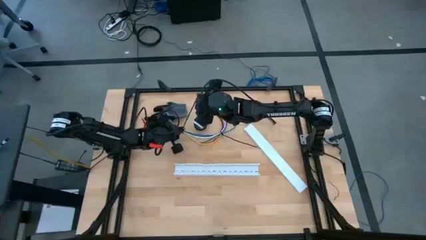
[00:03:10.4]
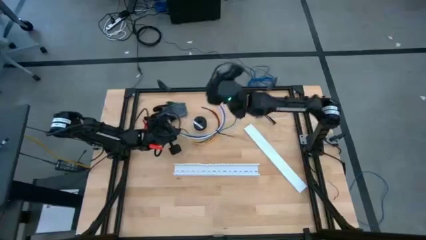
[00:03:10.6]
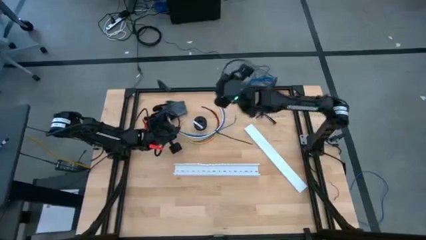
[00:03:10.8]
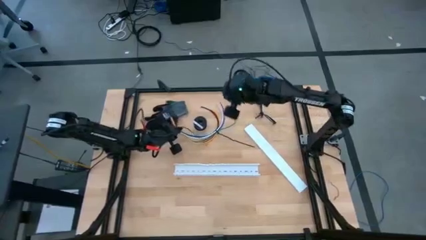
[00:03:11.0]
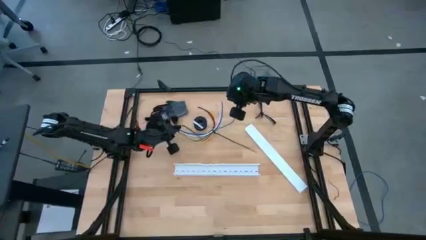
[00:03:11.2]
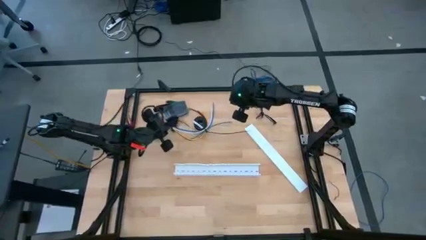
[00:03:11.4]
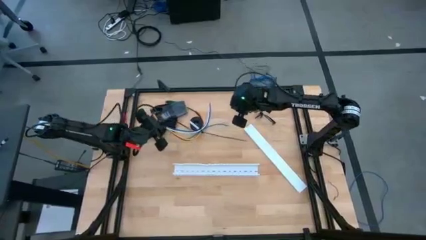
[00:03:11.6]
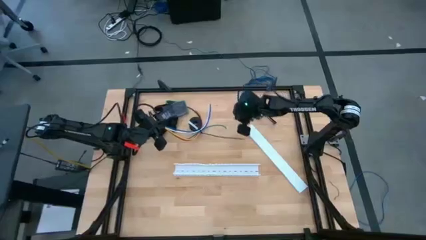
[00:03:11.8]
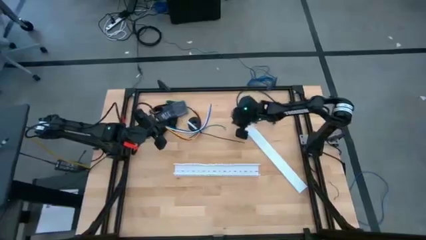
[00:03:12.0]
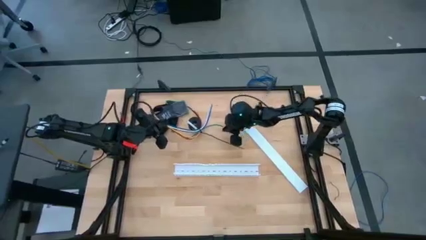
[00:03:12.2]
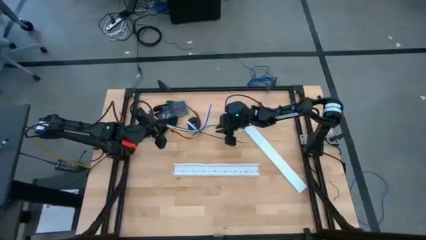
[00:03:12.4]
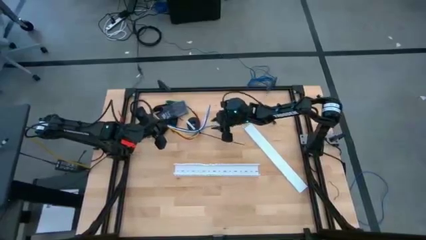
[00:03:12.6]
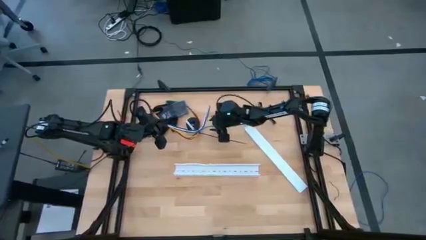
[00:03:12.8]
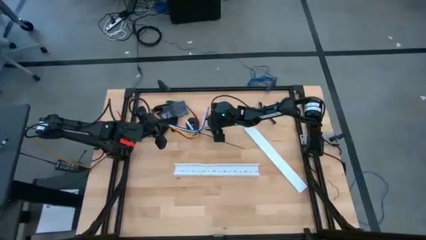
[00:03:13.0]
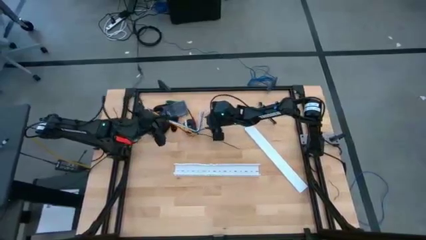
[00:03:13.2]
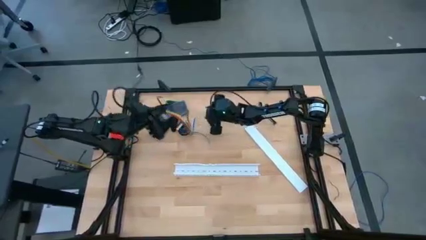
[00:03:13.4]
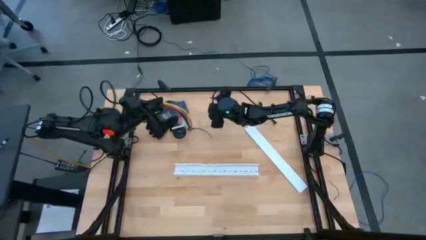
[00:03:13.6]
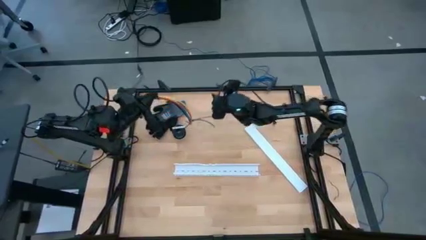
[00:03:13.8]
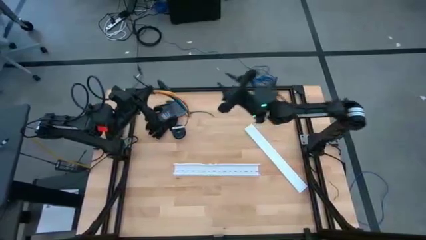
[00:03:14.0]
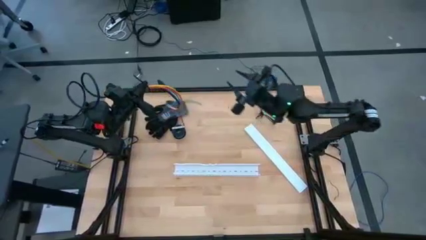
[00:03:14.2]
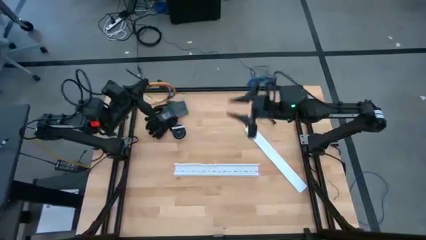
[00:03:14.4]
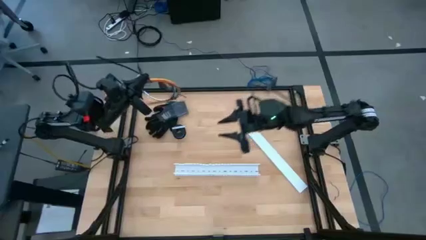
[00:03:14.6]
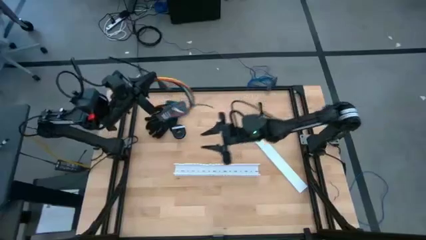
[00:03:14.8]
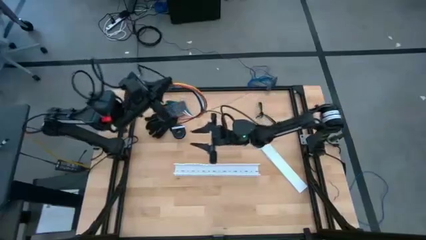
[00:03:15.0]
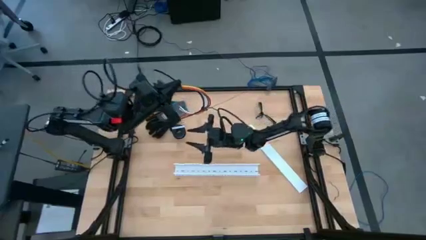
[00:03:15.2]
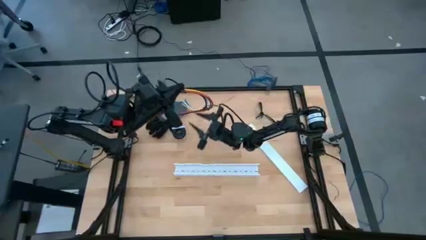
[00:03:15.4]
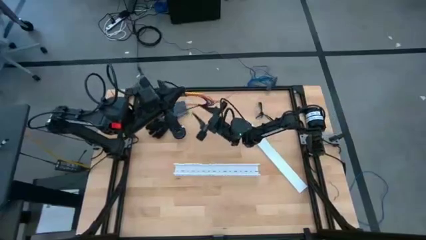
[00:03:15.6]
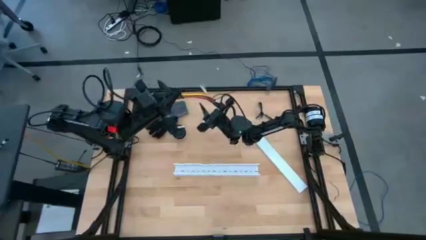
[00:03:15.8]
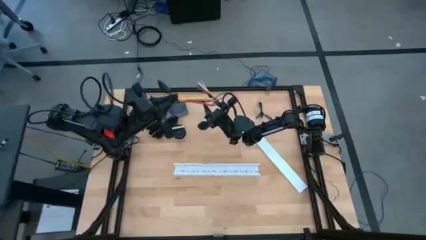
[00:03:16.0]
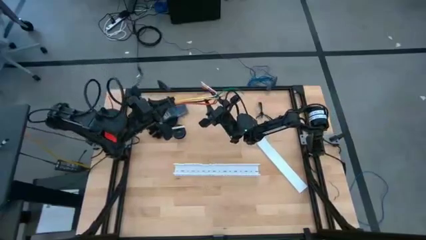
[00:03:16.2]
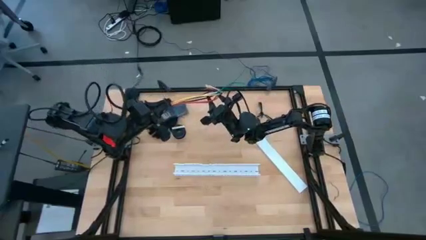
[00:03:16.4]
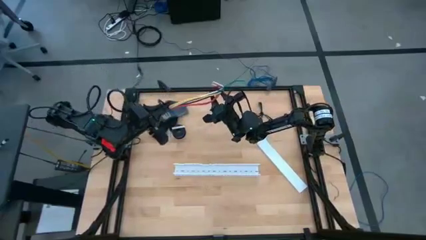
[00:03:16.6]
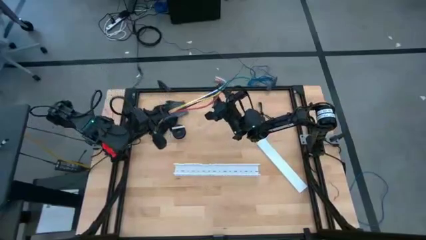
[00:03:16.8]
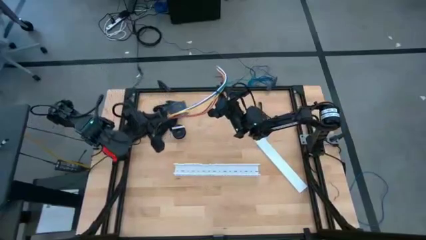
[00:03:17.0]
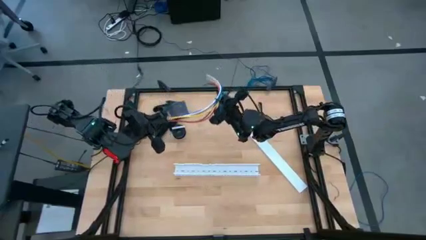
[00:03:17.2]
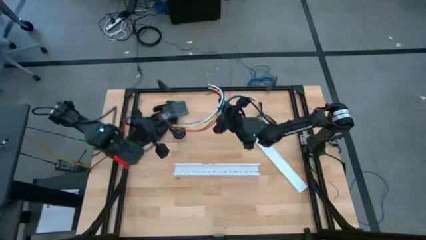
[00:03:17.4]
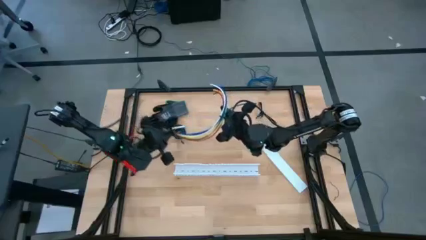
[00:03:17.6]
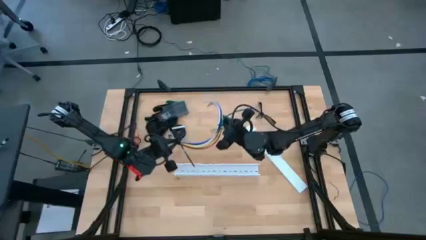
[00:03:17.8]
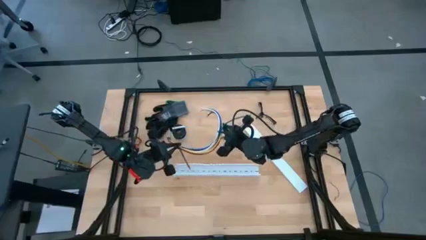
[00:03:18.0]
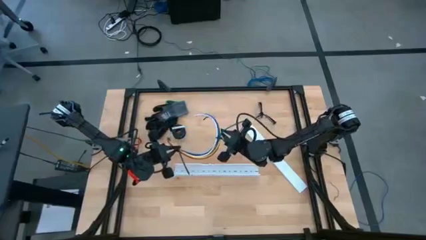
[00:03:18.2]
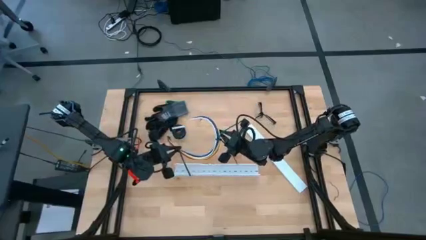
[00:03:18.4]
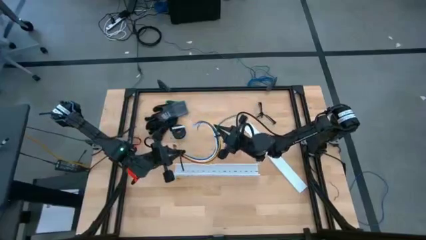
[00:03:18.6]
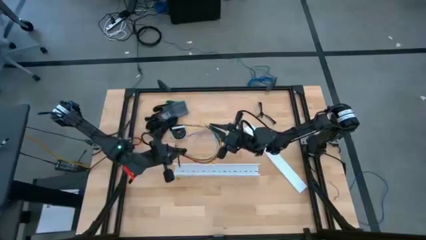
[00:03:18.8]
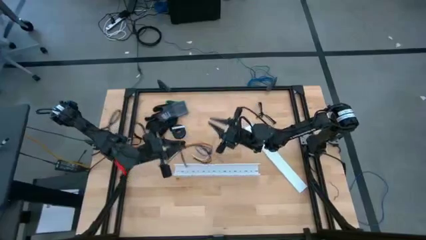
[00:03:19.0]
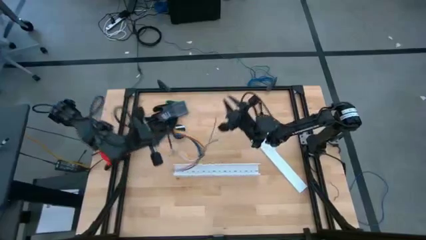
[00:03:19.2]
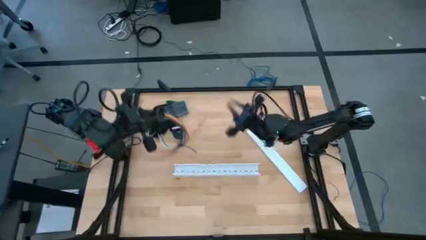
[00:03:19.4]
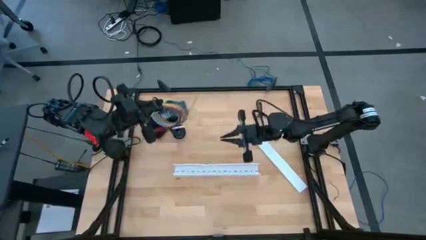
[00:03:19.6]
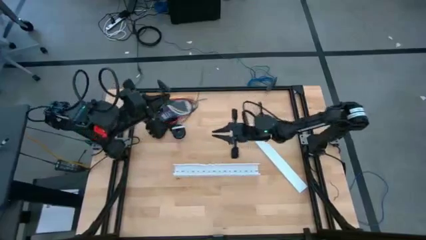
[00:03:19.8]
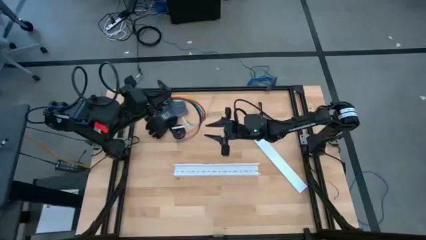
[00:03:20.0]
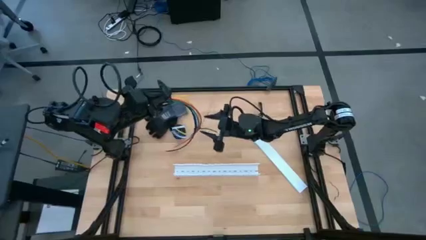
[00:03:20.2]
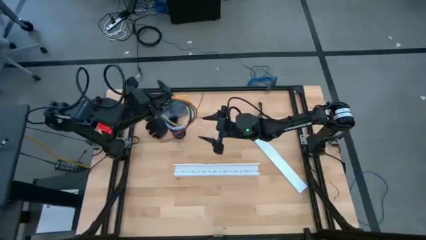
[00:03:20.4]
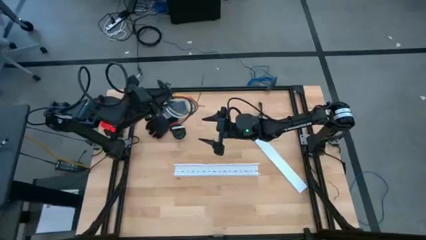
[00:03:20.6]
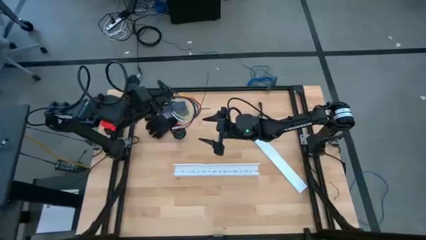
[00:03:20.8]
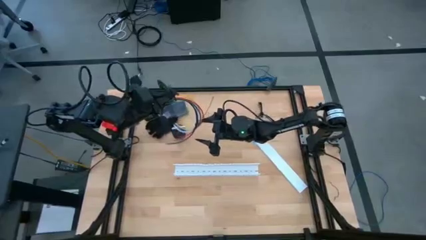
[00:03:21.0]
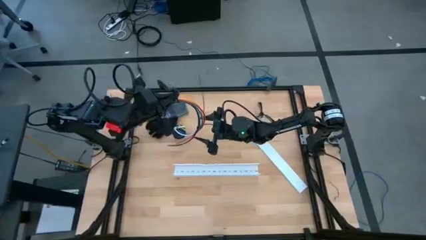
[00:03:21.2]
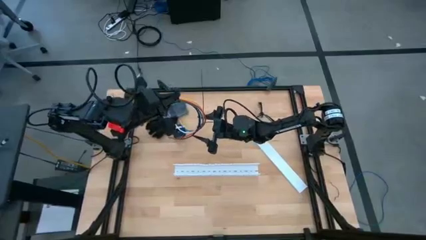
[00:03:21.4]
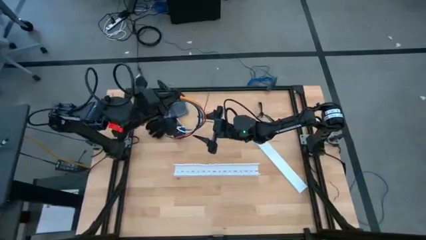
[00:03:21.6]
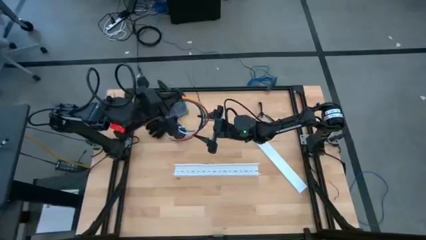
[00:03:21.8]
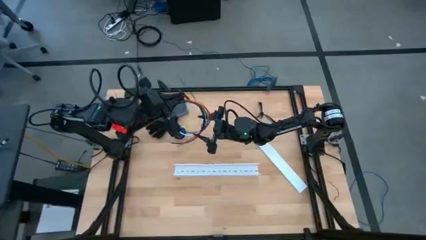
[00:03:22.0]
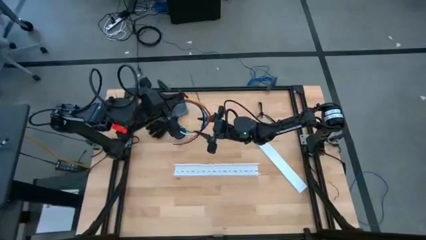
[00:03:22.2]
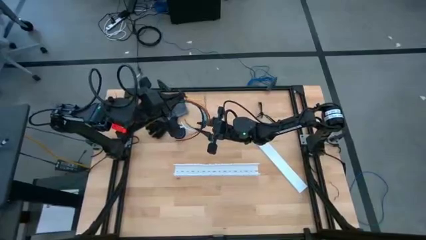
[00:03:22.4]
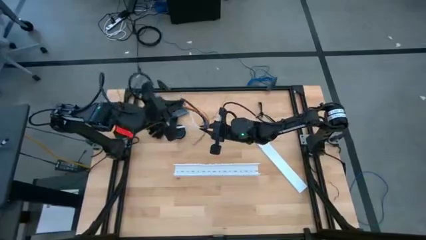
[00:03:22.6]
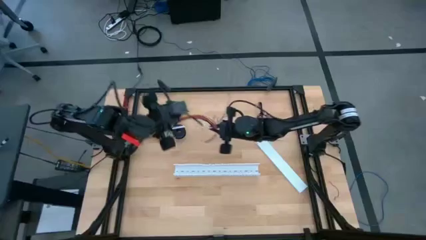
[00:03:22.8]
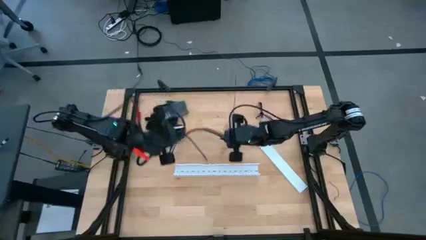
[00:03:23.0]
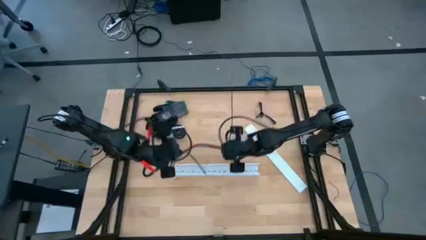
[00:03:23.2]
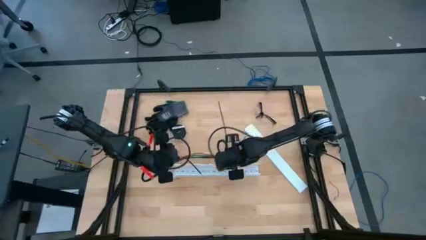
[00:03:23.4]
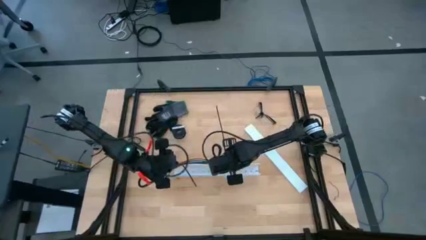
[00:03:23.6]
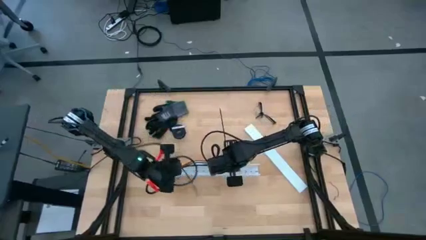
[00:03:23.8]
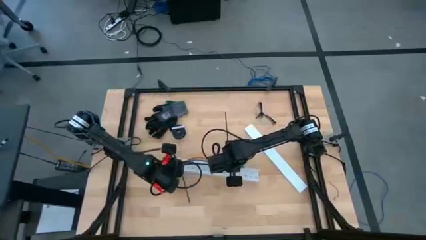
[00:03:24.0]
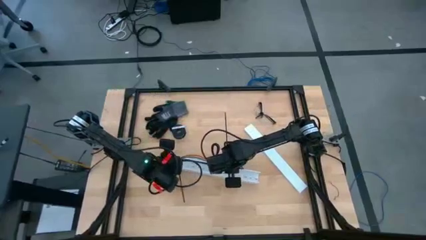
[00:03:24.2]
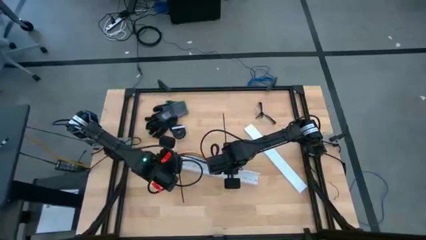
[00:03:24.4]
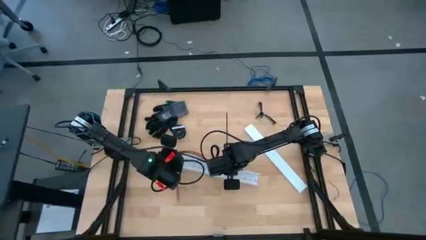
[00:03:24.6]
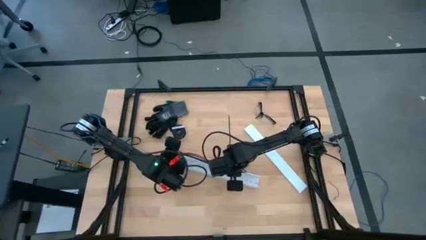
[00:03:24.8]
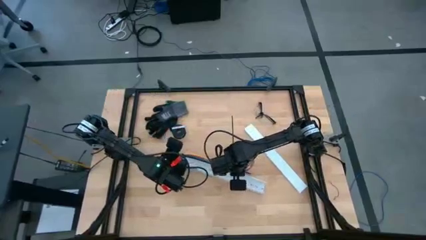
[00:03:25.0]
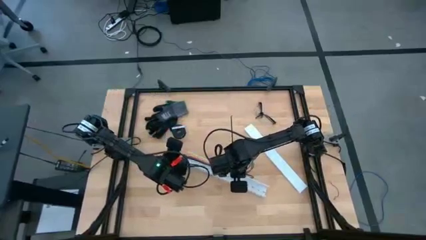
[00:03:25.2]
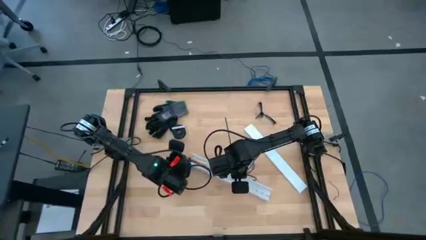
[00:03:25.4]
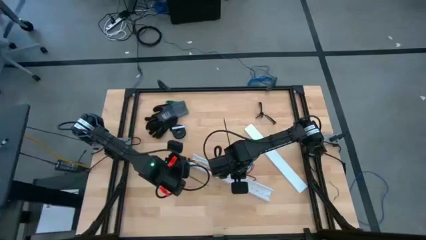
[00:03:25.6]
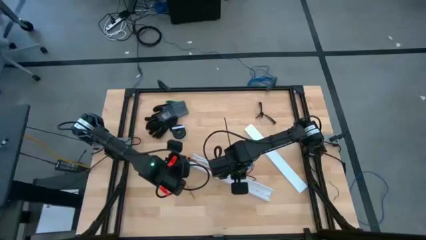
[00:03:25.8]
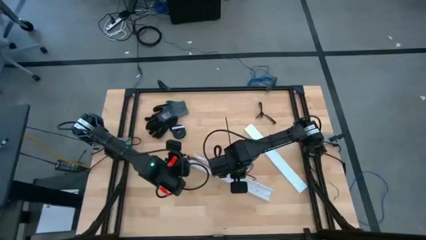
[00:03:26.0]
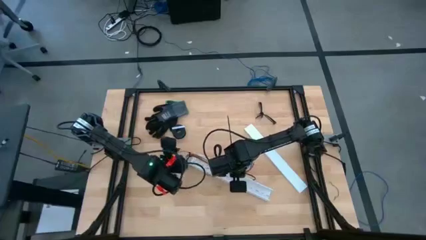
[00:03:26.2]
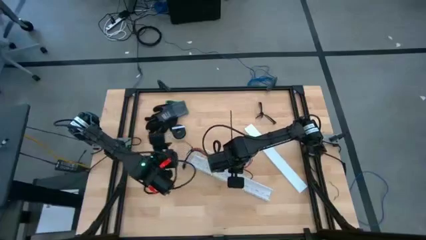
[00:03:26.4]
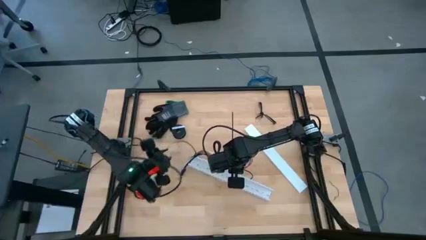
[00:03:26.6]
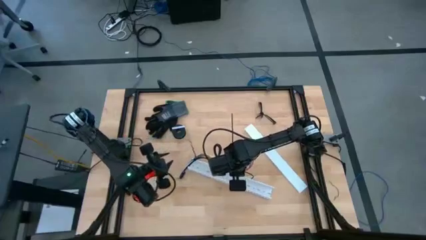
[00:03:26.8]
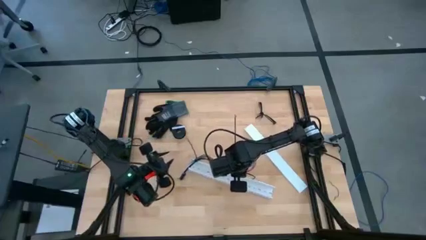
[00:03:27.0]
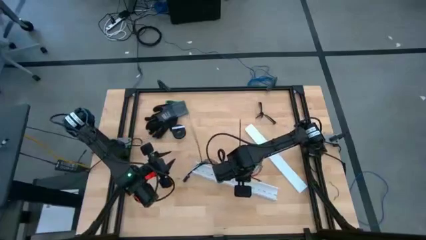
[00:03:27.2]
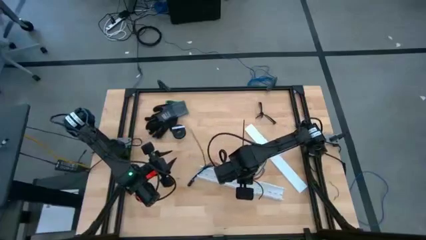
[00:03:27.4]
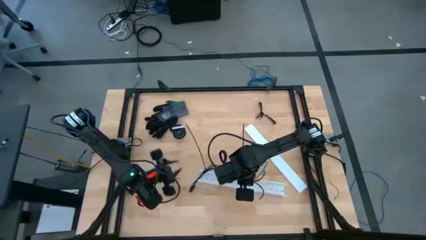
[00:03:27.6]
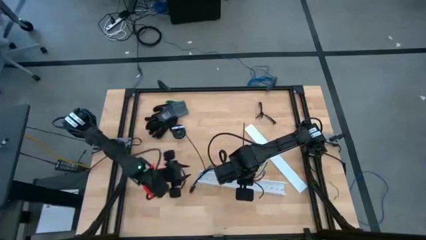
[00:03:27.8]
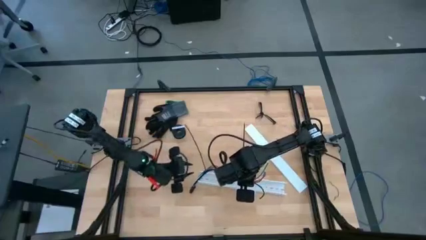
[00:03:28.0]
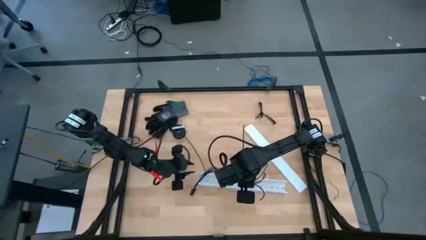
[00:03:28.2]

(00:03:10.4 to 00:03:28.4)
Task: Ziptie cables
Put the zip tied cable wires into the white cable duct
